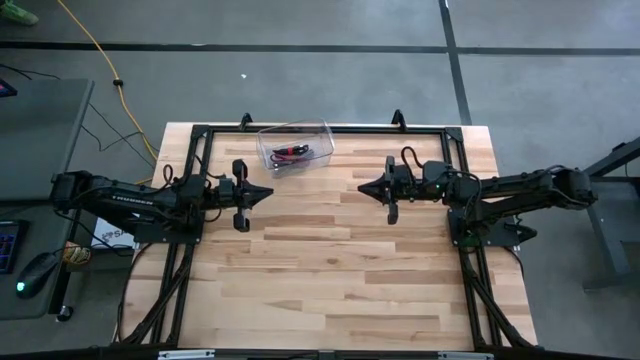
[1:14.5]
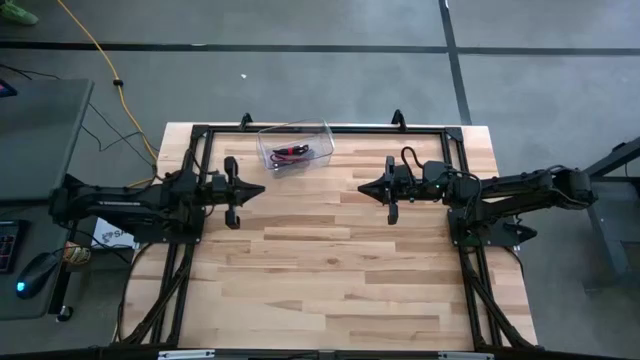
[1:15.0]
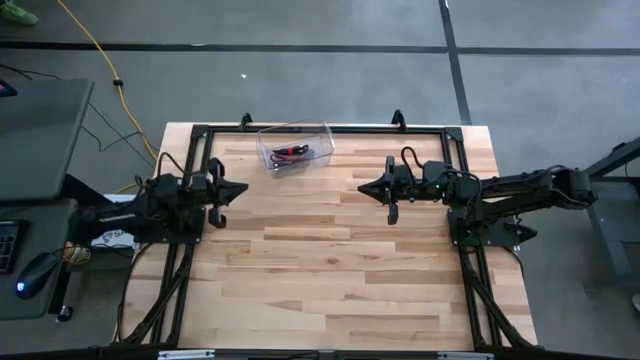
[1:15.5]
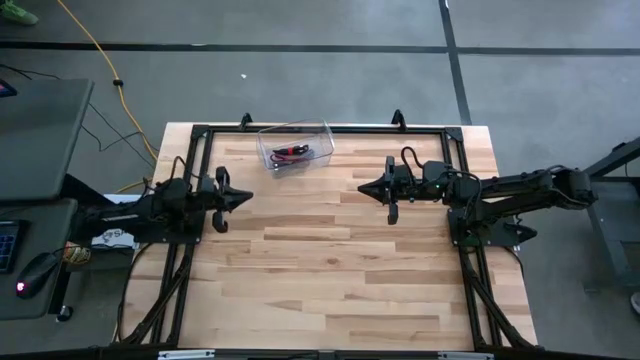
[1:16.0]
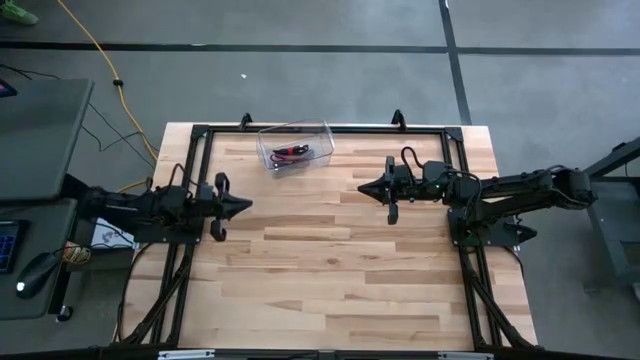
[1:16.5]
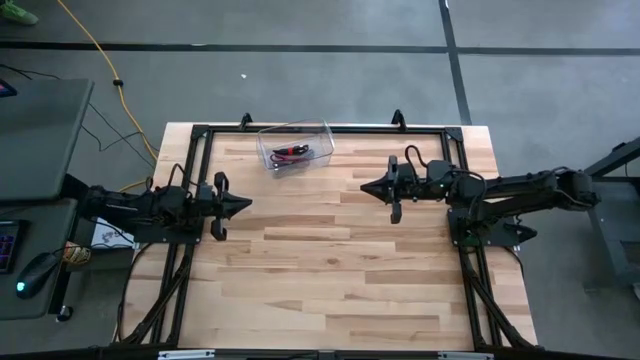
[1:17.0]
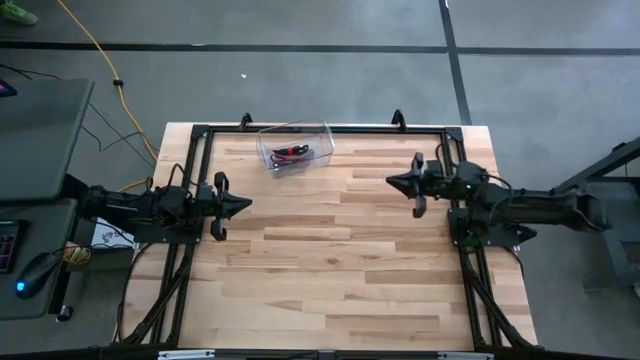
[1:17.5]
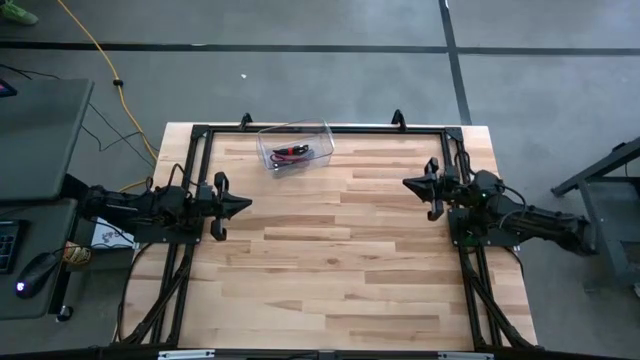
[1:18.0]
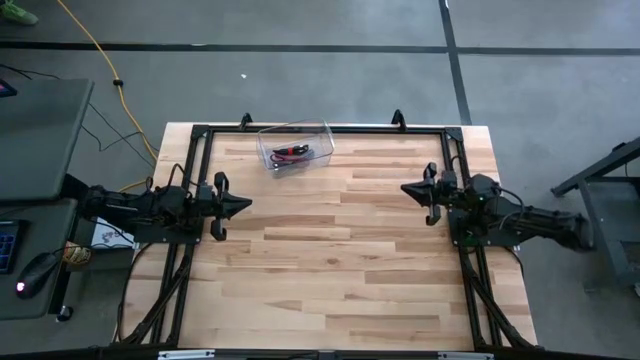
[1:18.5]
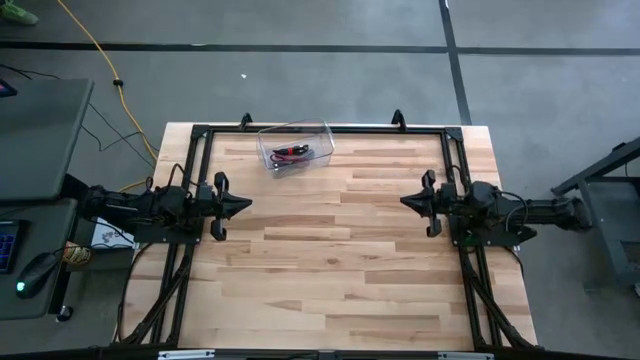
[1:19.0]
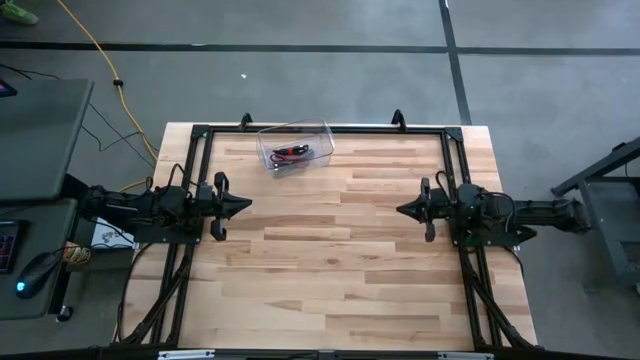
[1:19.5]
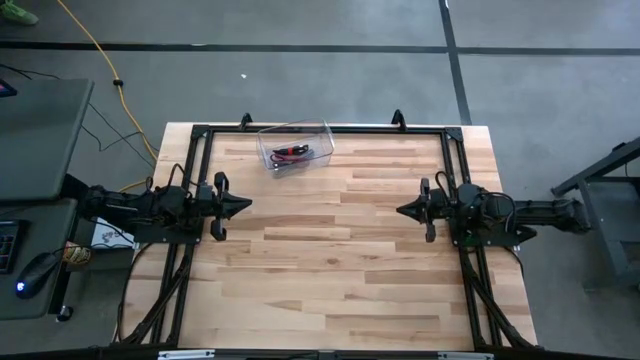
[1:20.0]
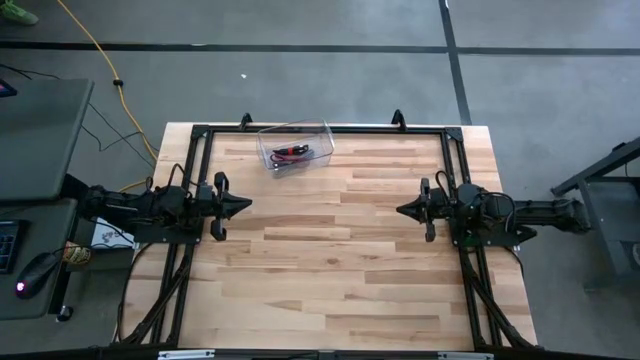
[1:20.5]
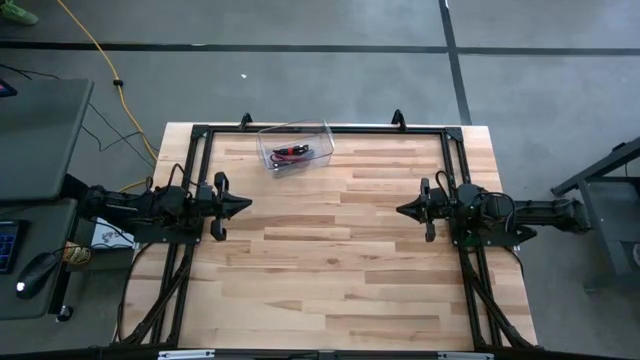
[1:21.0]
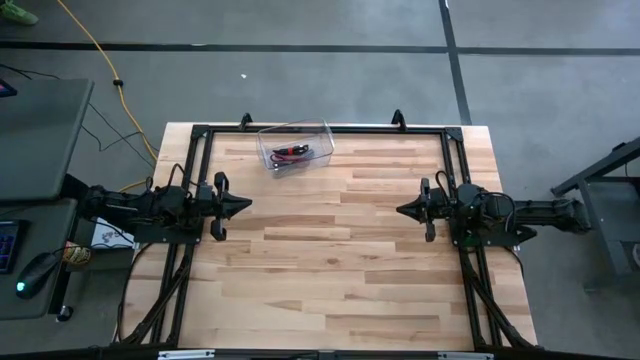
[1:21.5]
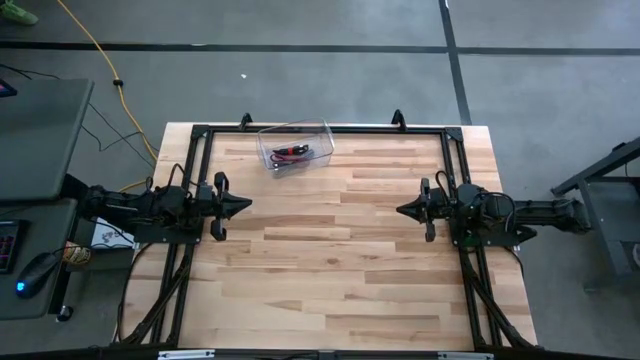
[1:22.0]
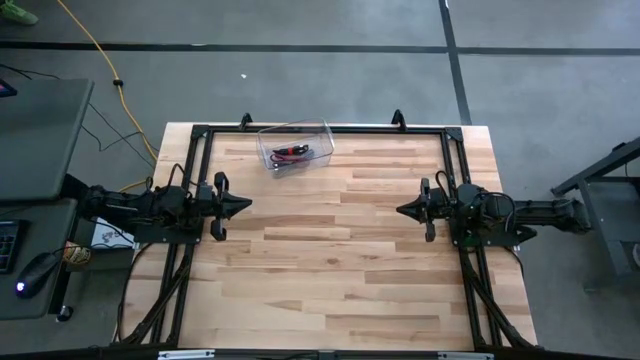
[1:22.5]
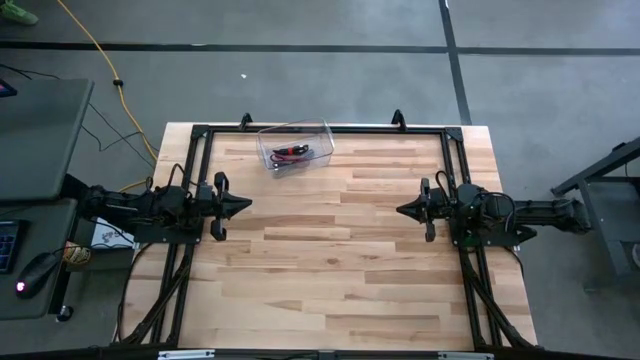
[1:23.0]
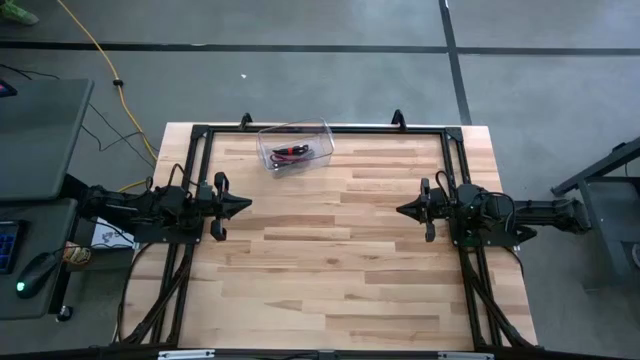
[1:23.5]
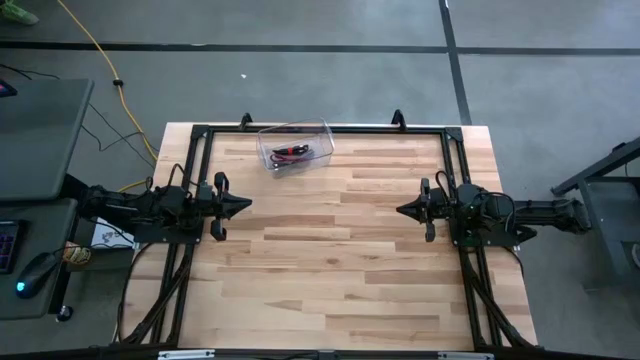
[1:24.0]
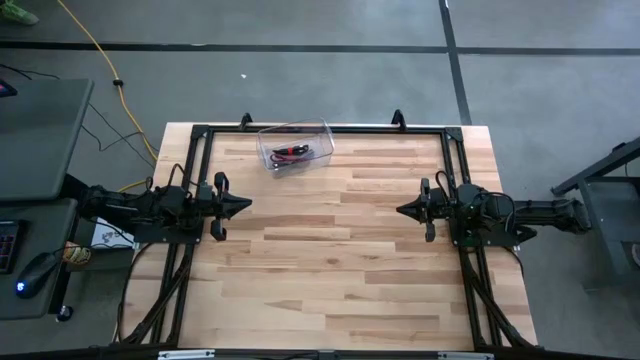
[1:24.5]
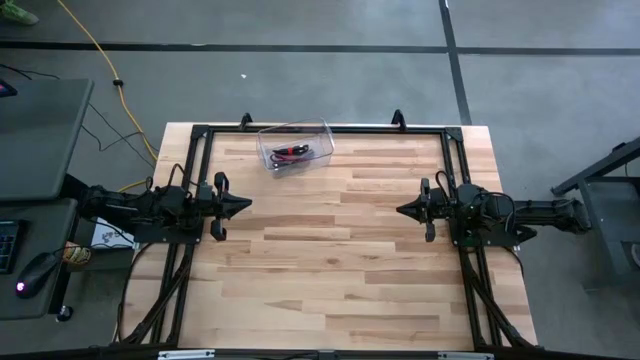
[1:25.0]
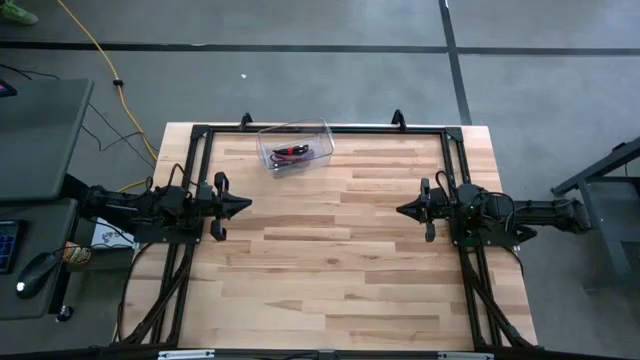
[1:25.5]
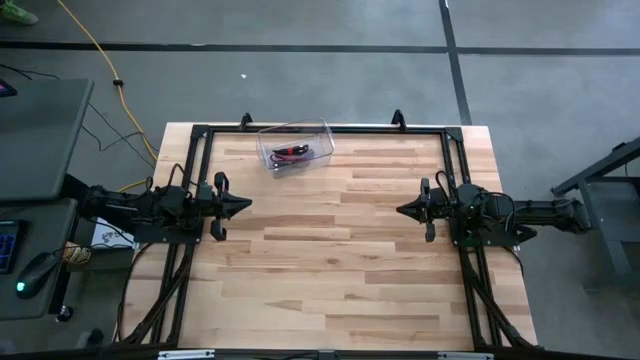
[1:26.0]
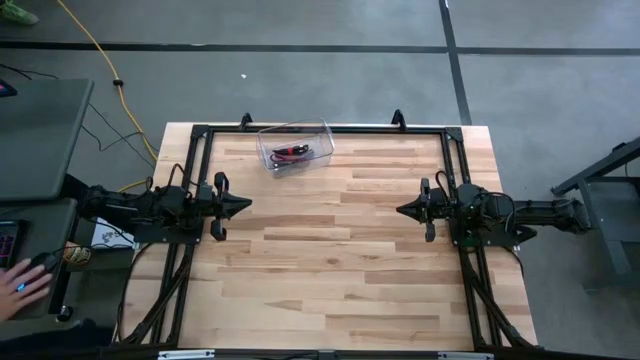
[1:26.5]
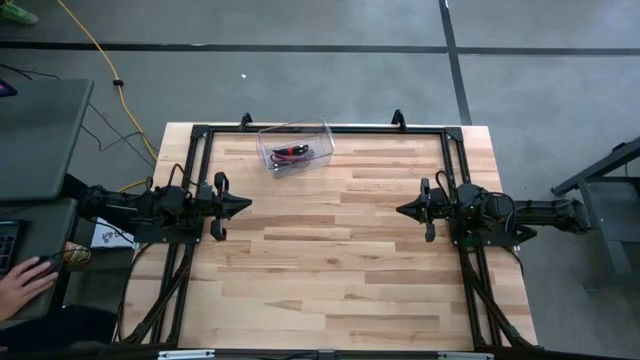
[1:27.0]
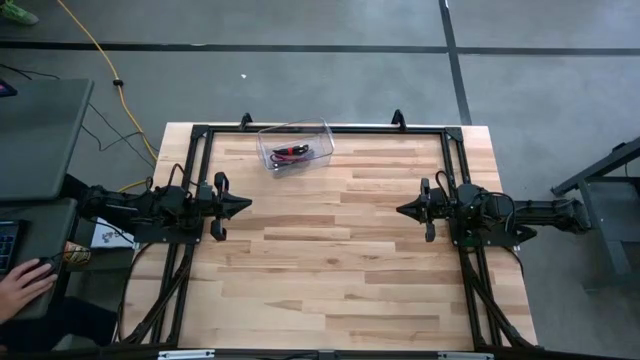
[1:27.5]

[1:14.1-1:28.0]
Task: Pick and place USB-C Cables
Return to Home Position

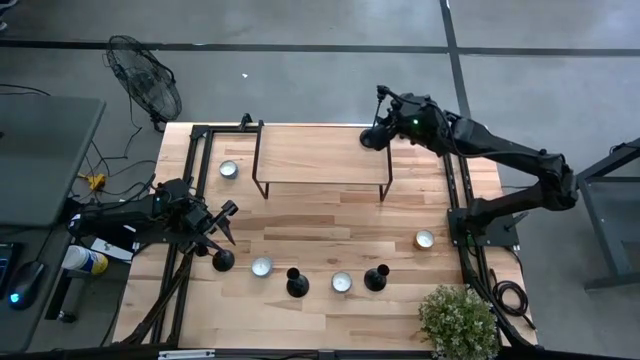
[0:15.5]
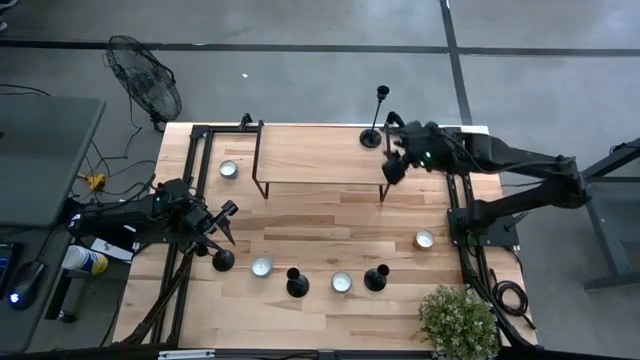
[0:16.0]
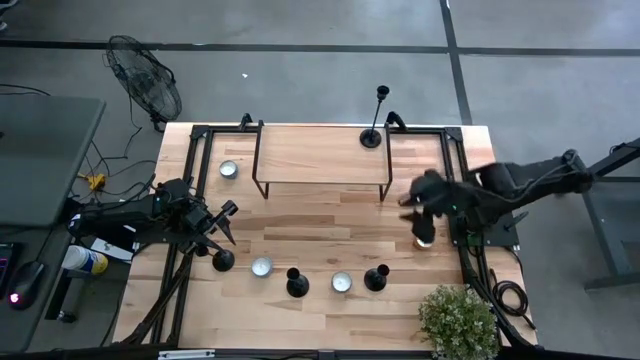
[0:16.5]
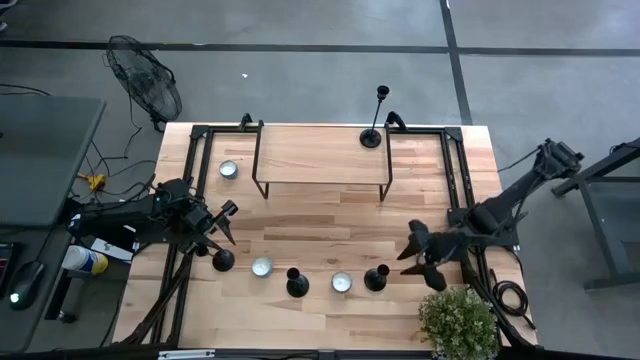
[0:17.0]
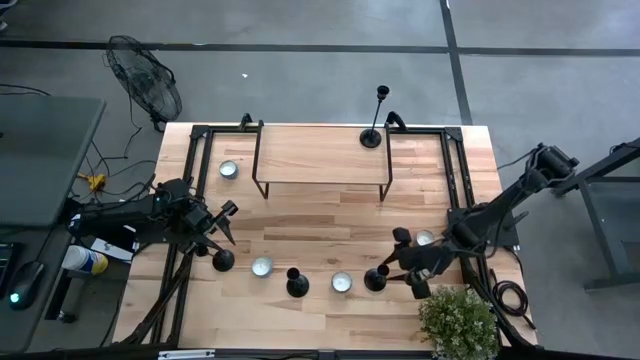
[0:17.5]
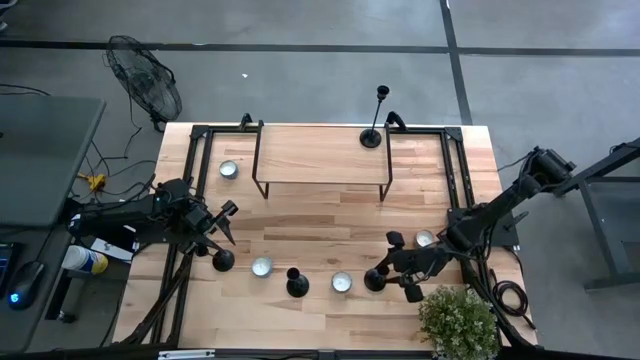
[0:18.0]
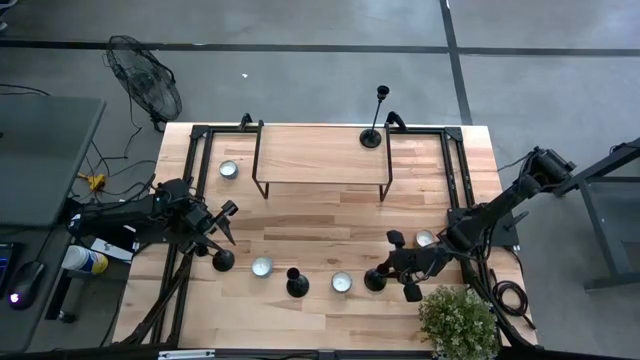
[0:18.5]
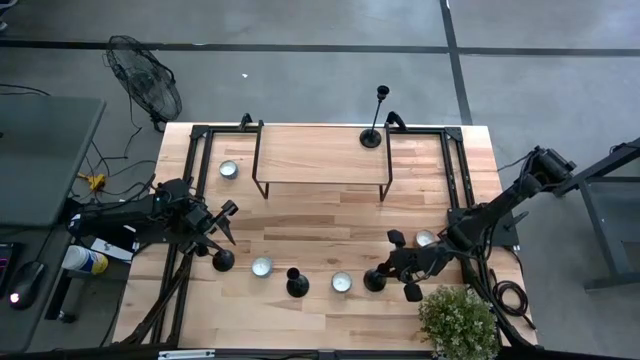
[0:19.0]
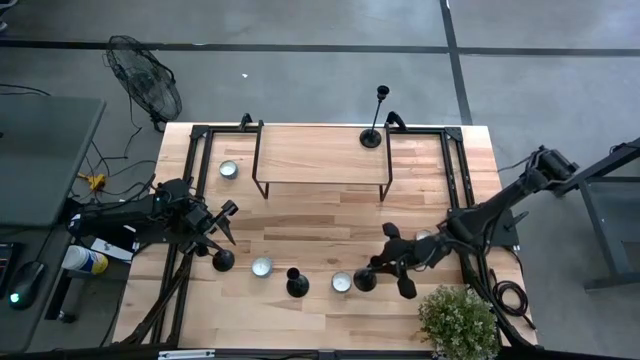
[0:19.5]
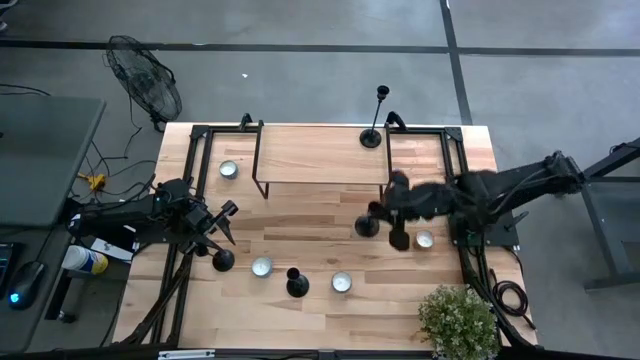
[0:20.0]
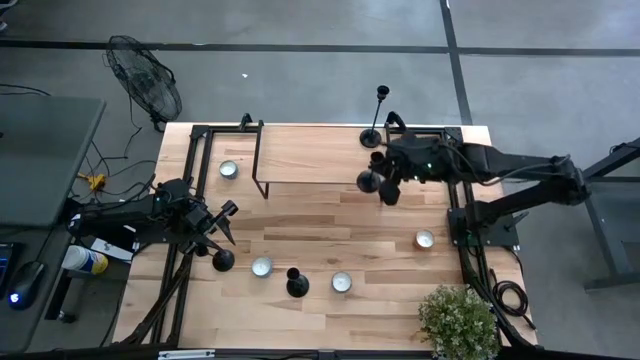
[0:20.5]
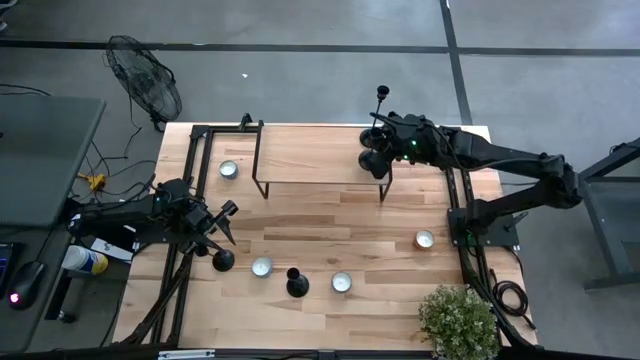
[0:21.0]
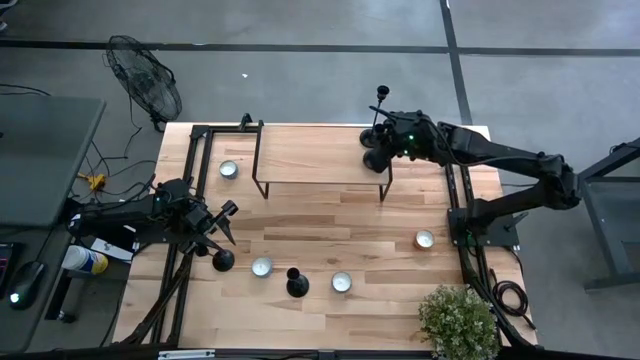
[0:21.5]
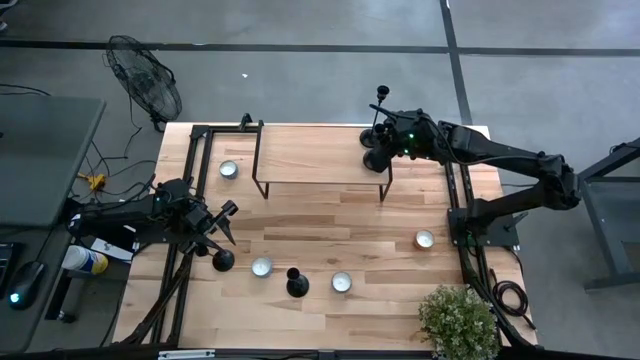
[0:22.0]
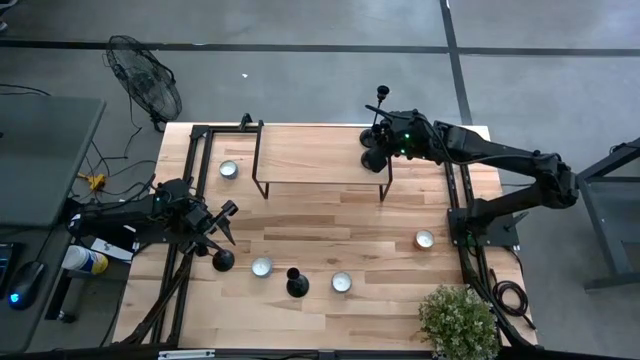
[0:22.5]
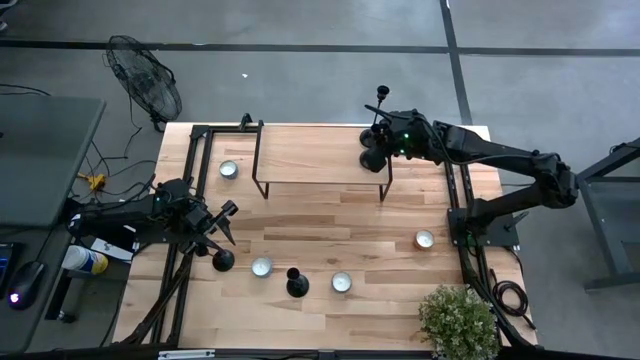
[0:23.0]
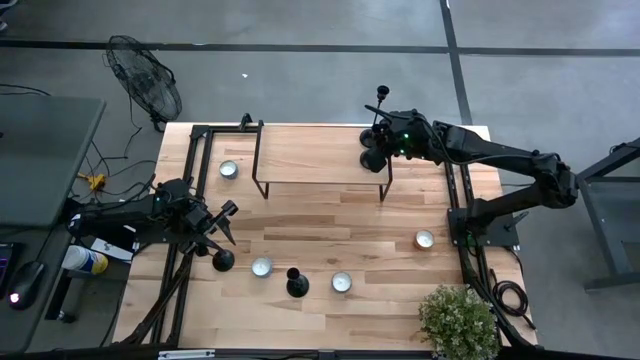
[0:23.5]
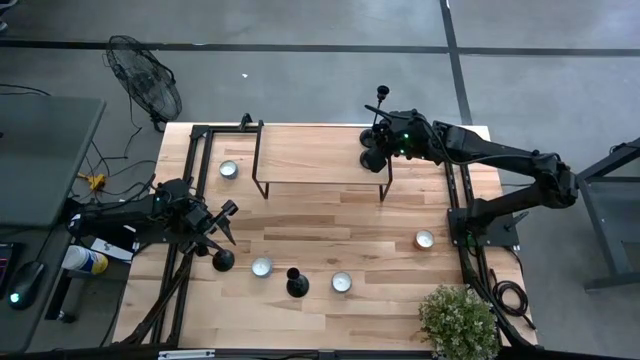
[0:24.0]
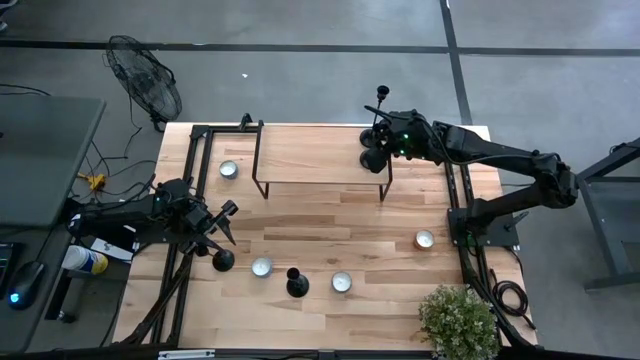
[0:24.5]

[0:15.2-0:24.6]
Task: Pick & Place candle stick holders
Put the black candle holder on the shelf and align it with the other black candle holder
